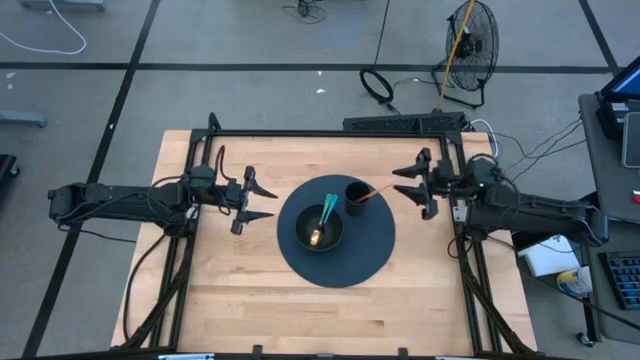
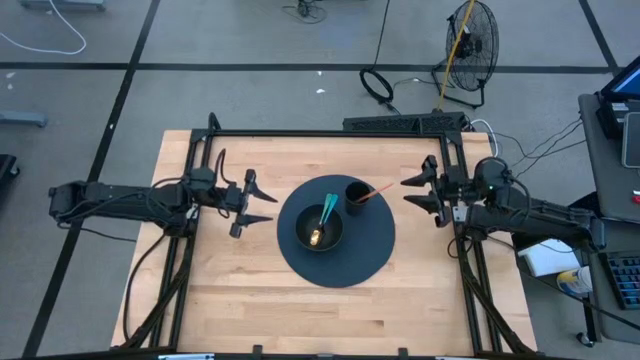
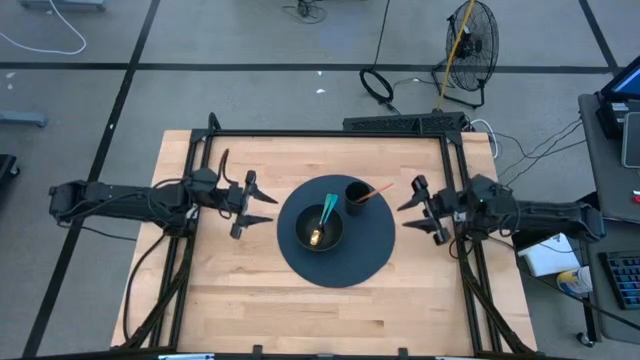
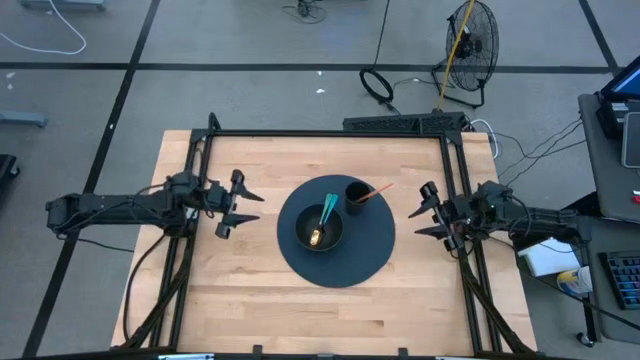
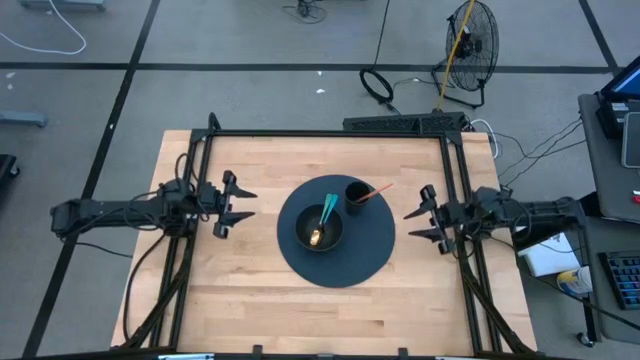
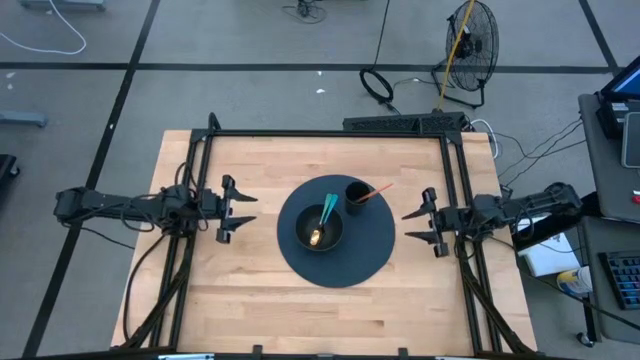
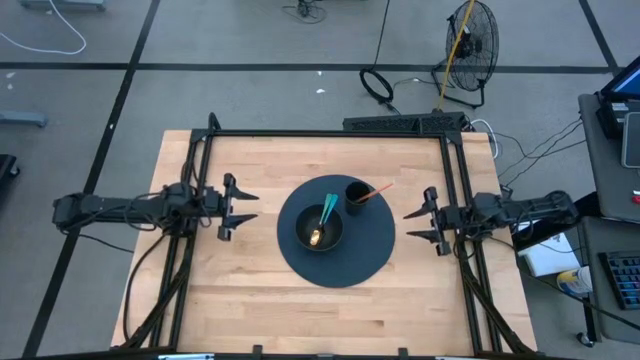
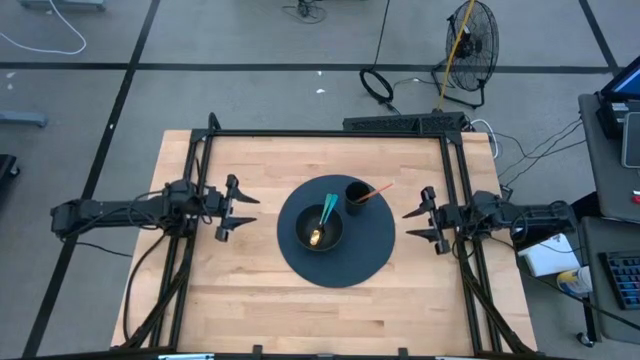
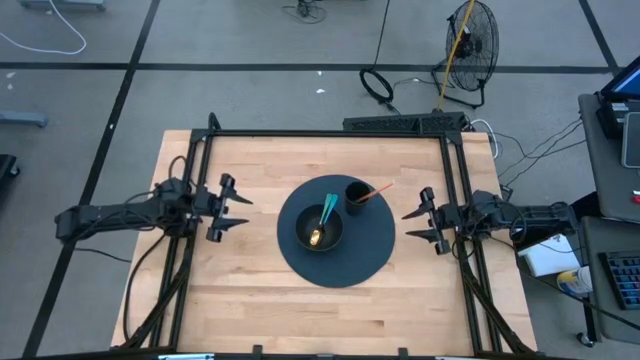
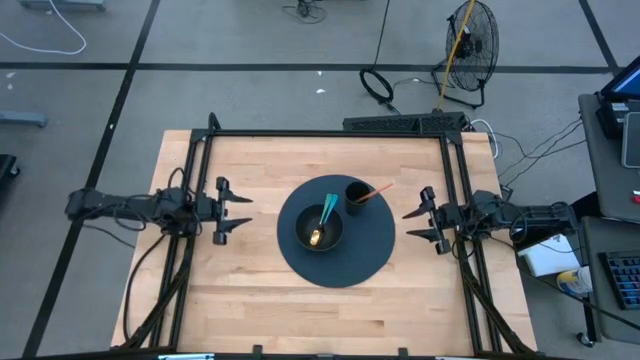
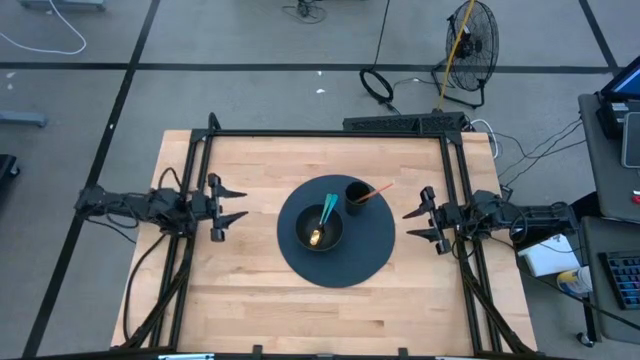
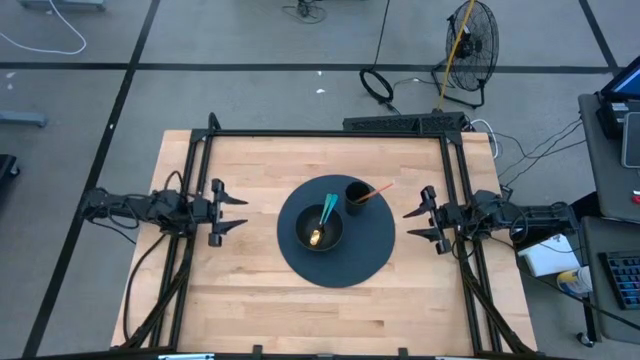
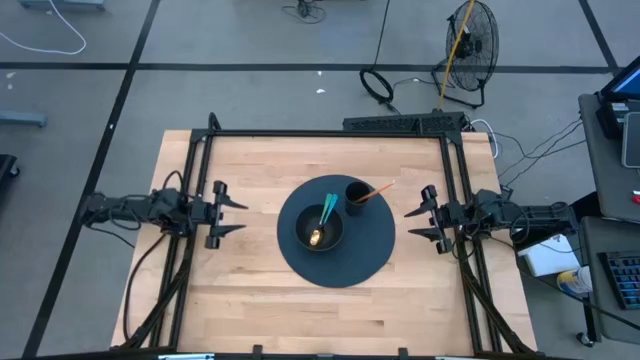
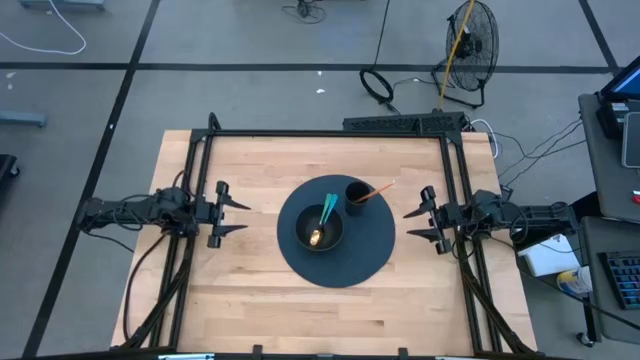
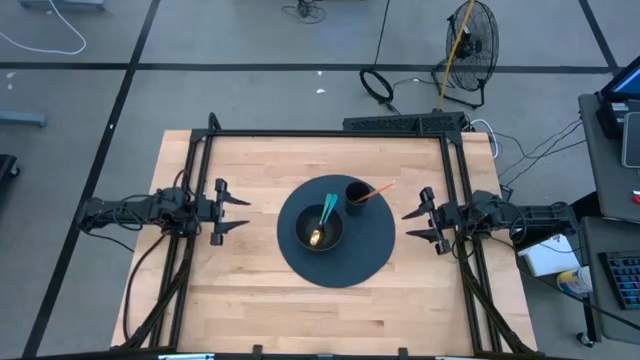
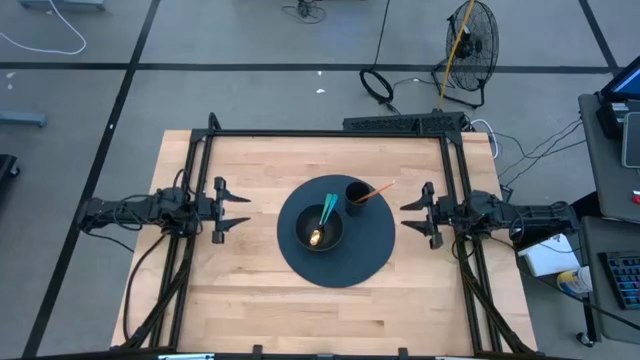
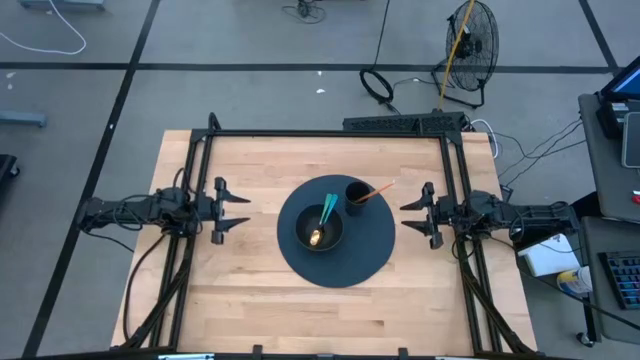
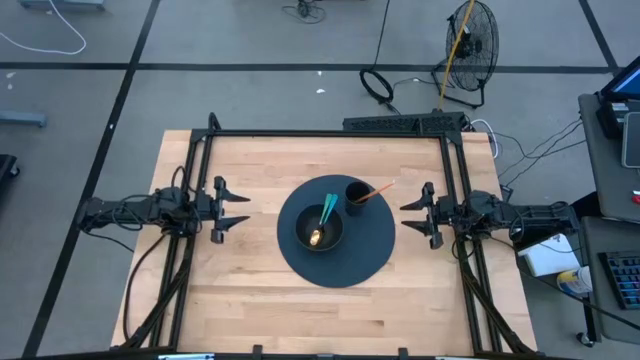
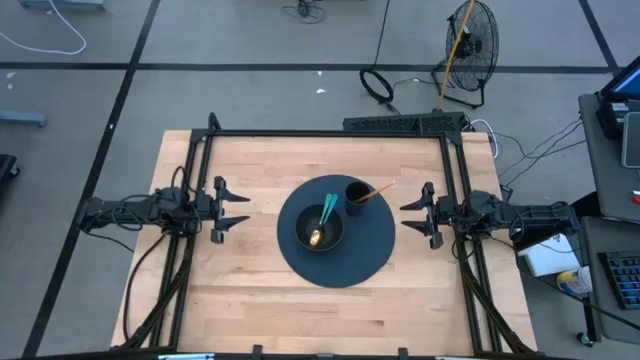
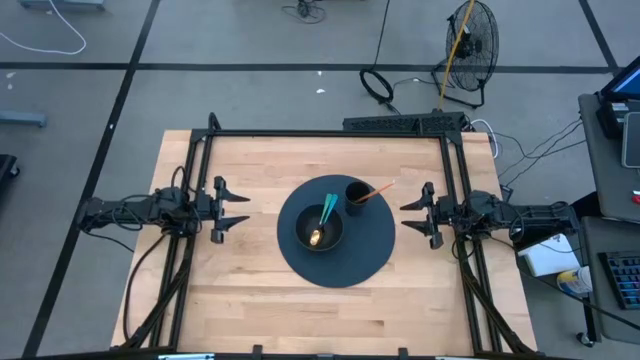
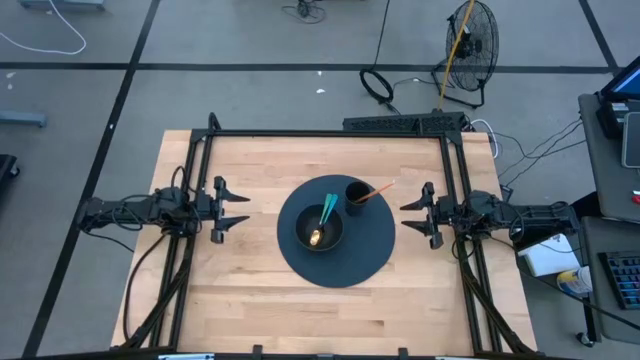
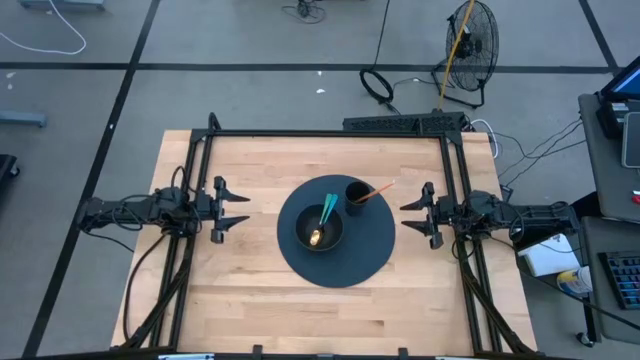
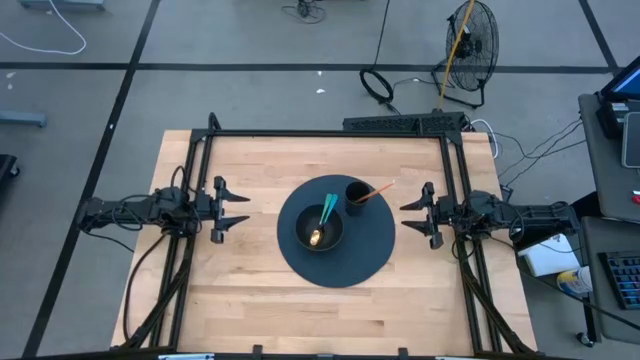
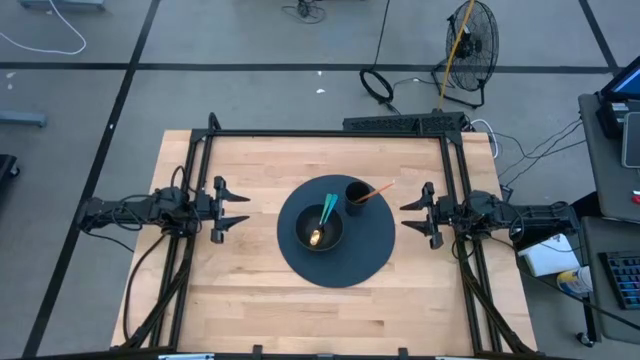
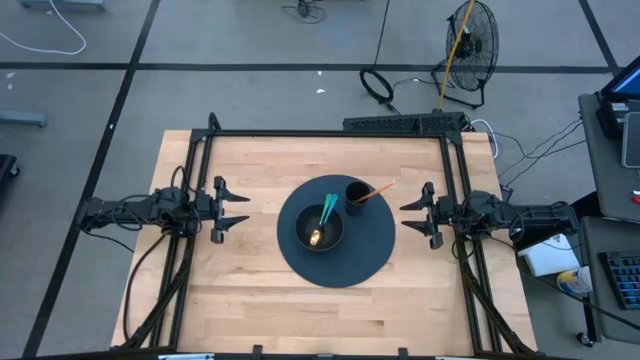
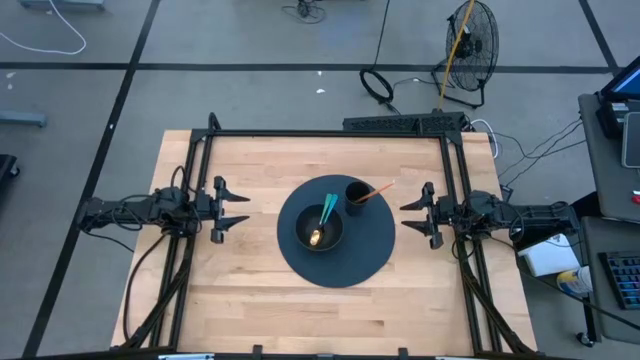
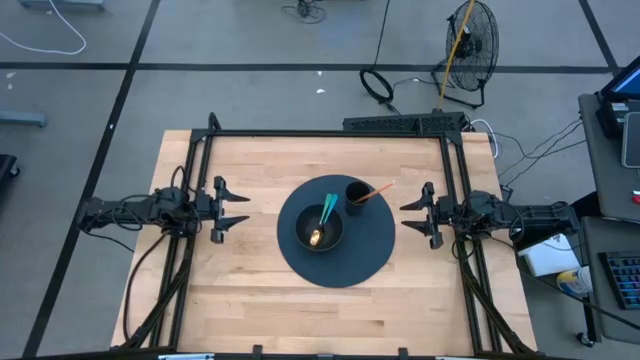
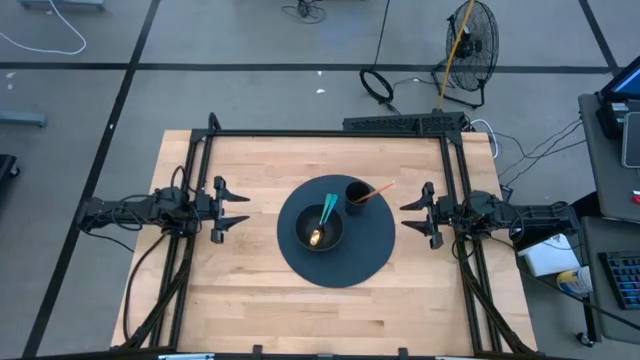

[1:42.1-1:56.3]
Task: Pick & Place Utensil
Return to Home Position

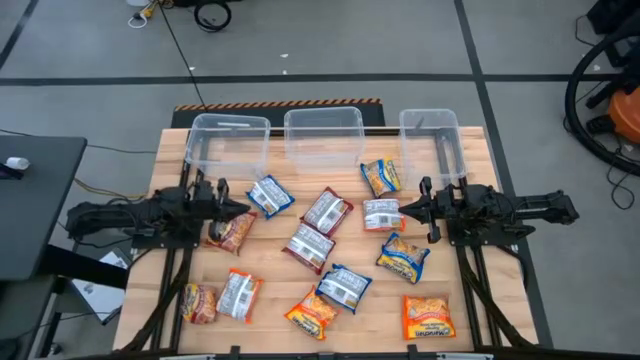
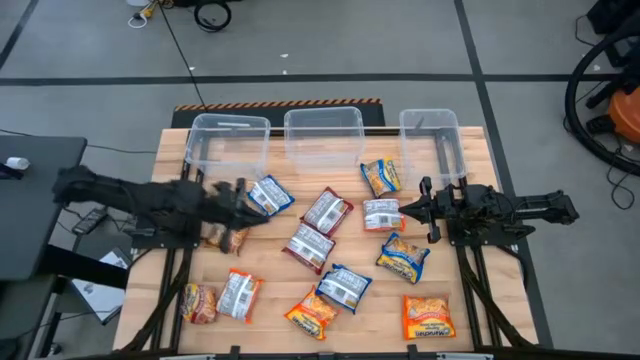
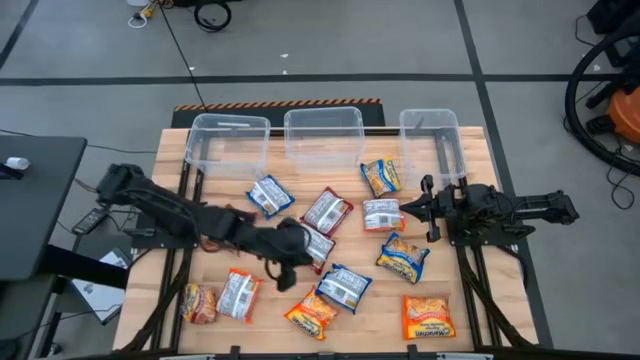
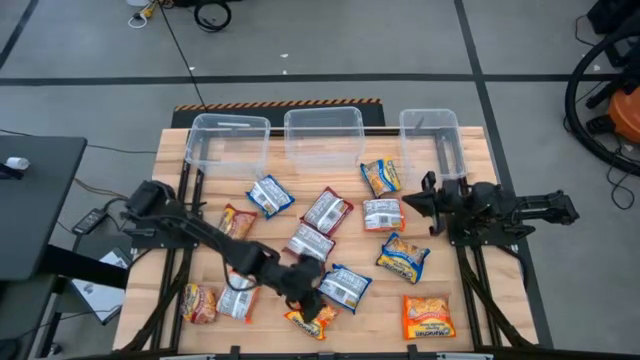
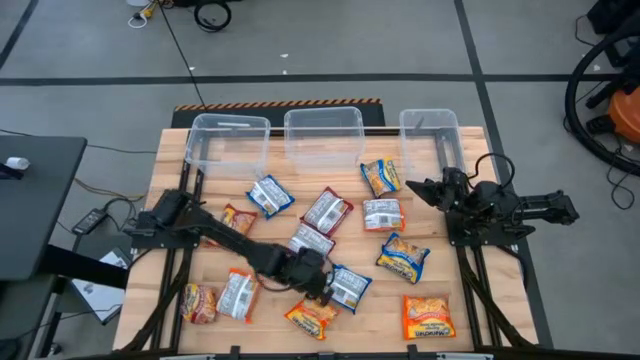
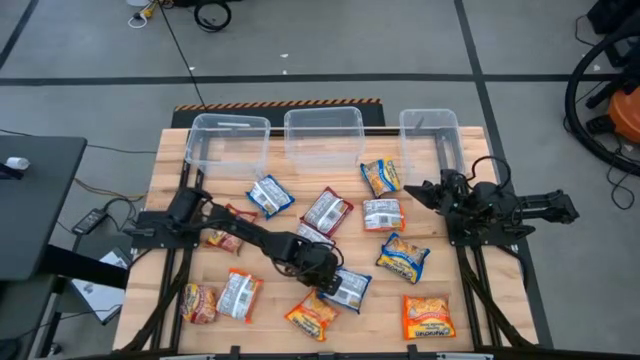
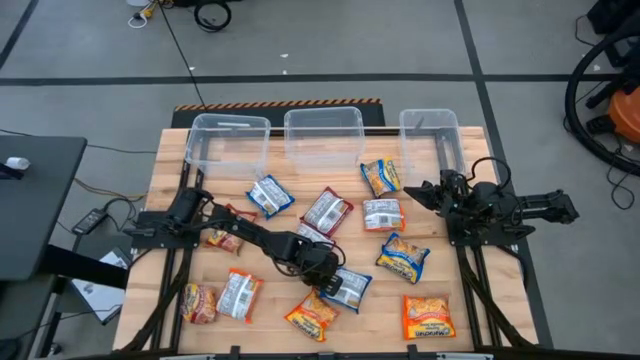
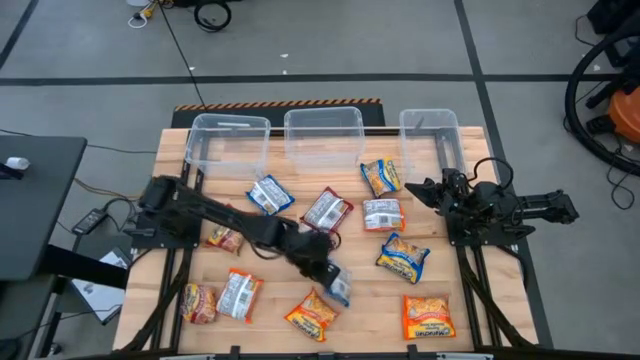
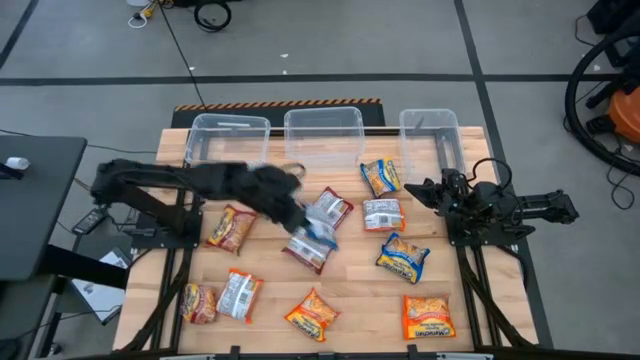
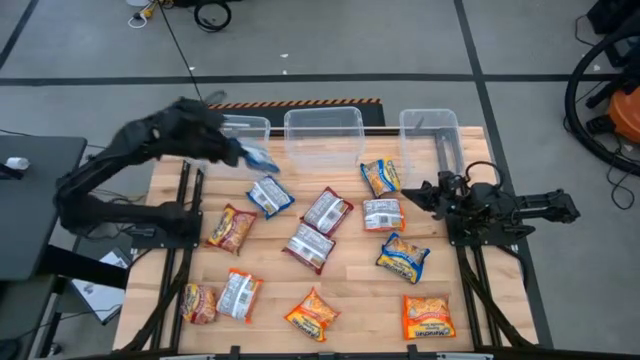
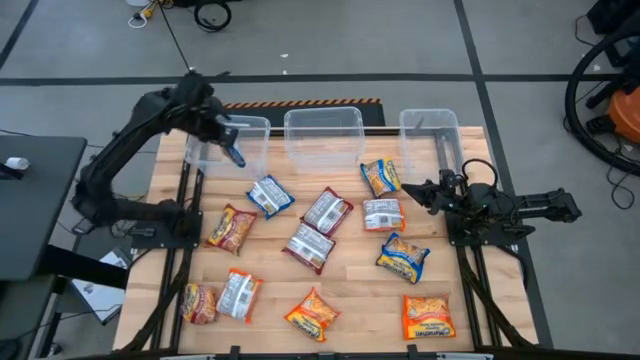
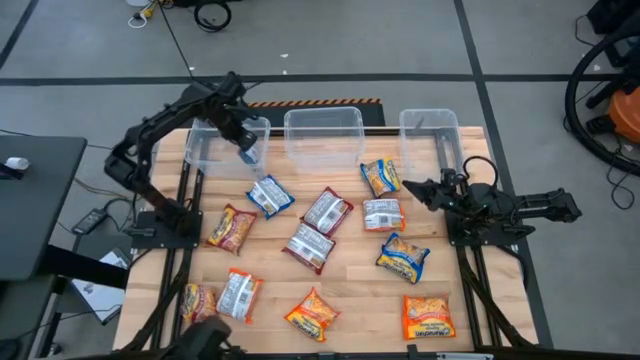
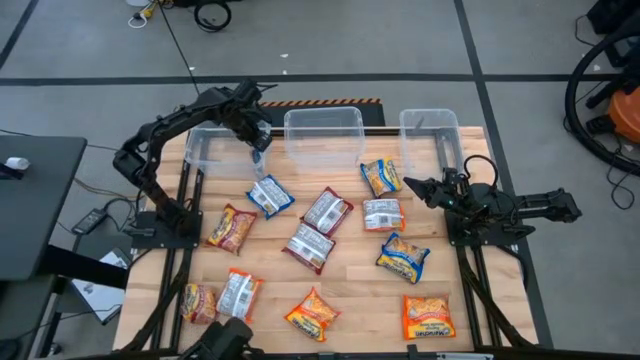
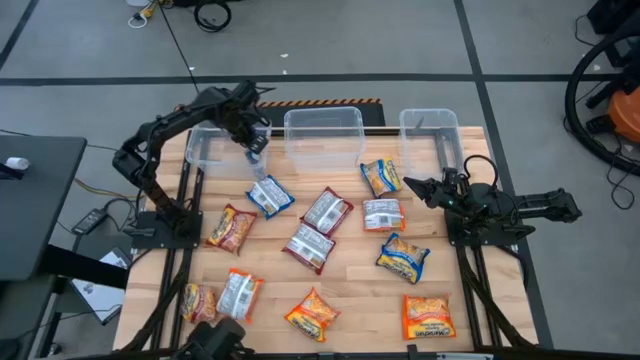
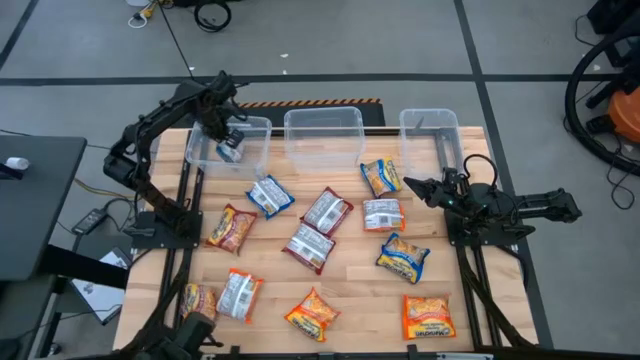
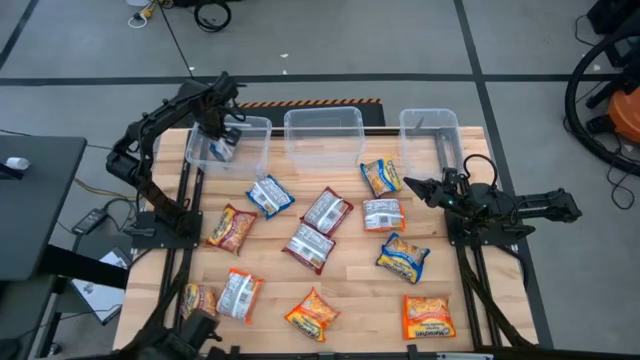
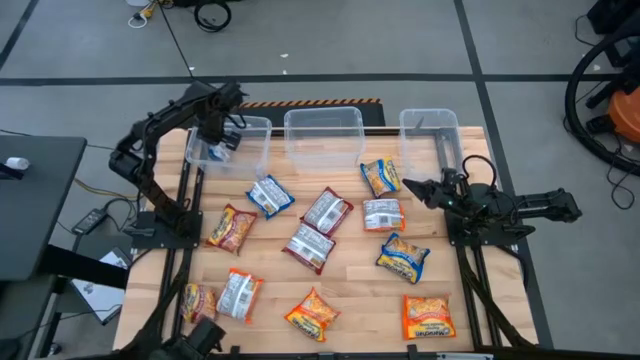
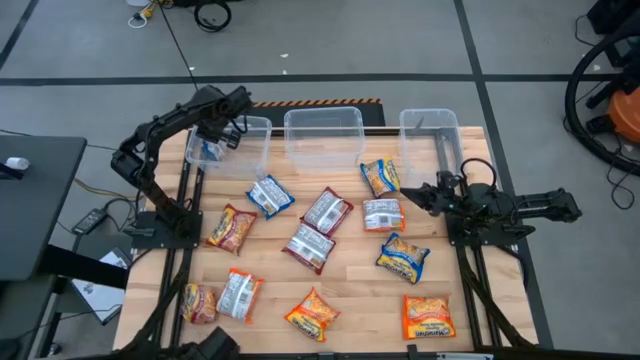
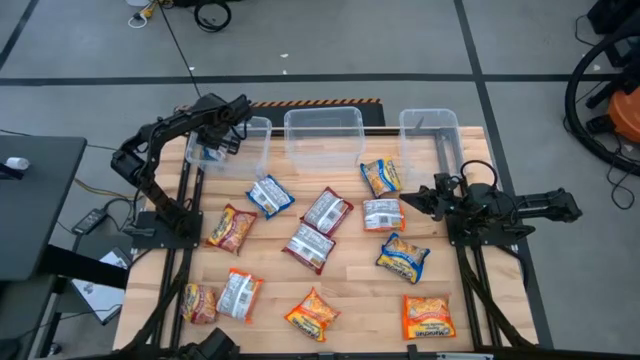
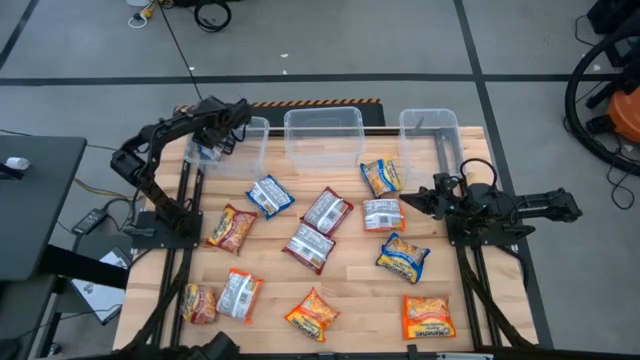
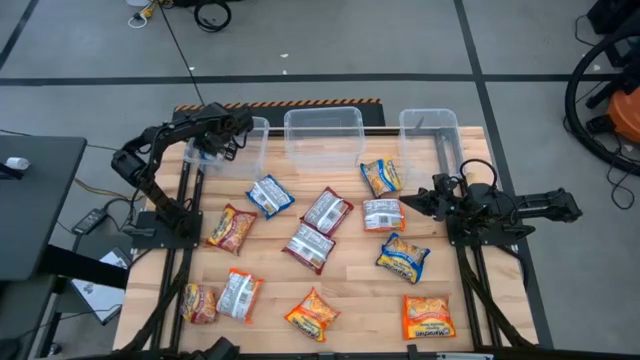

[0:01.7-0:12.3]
Task: Sort Maruchan noodles
Put the bottom left blue noodle pack into the left transparent bin
